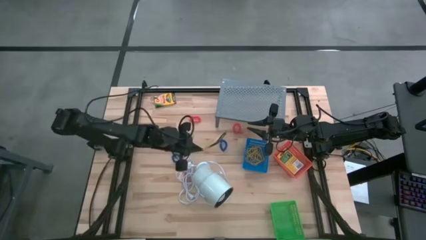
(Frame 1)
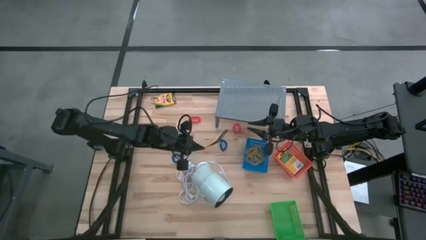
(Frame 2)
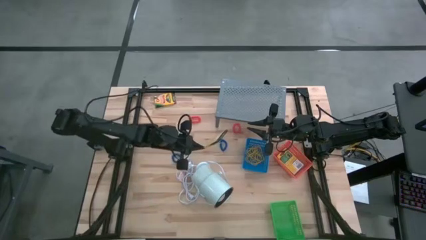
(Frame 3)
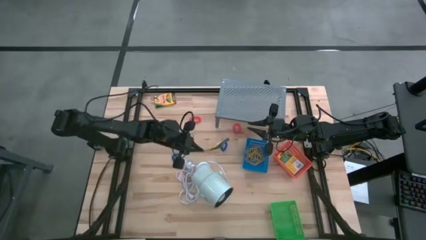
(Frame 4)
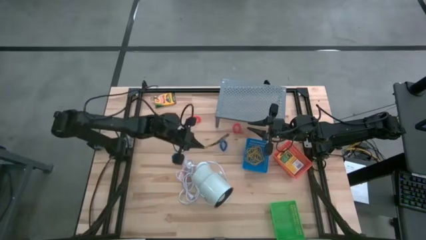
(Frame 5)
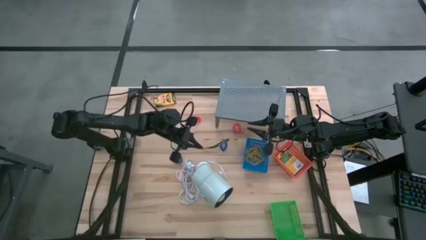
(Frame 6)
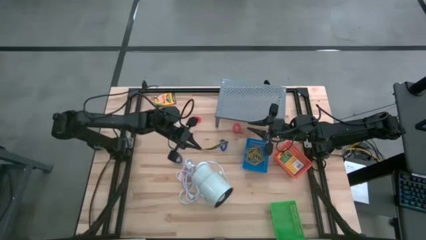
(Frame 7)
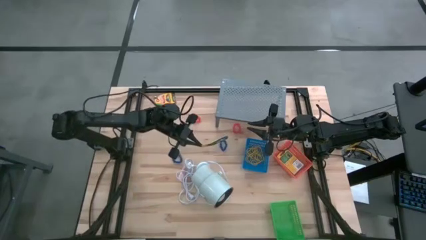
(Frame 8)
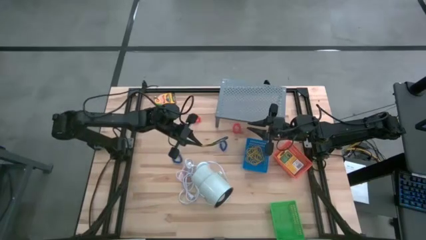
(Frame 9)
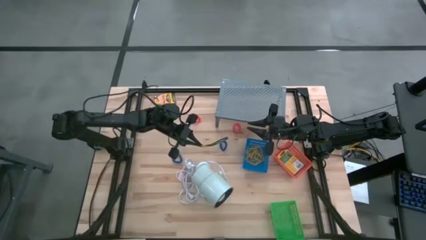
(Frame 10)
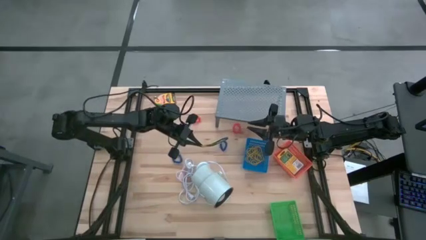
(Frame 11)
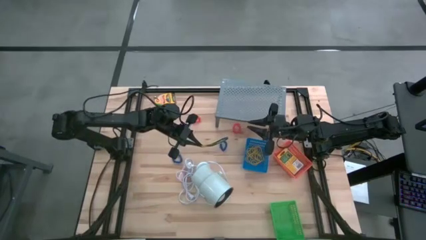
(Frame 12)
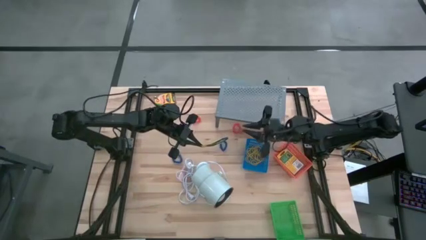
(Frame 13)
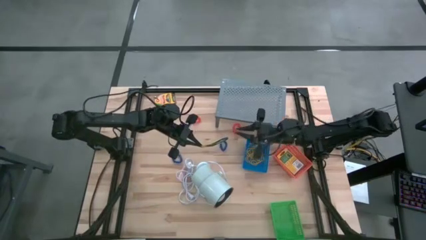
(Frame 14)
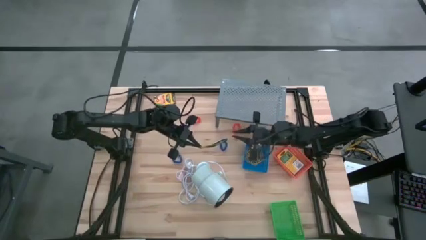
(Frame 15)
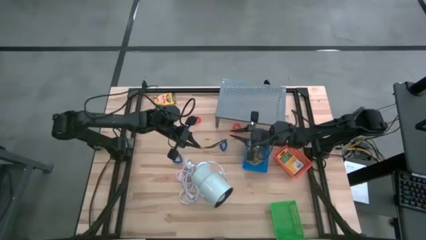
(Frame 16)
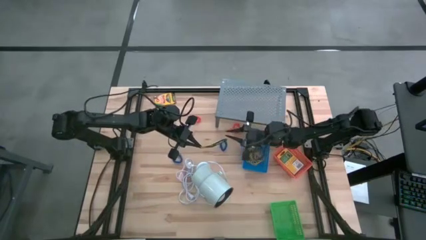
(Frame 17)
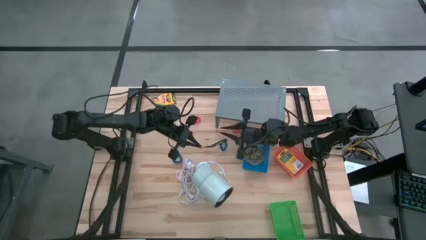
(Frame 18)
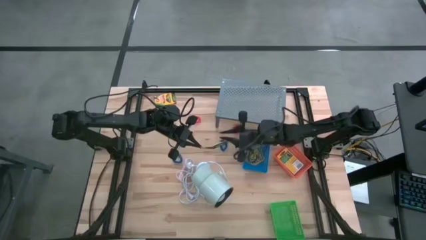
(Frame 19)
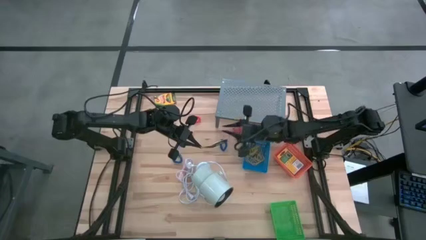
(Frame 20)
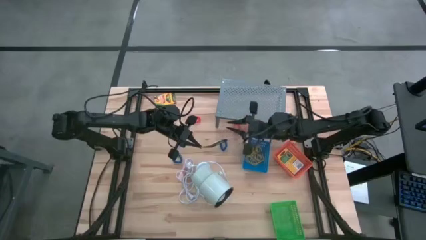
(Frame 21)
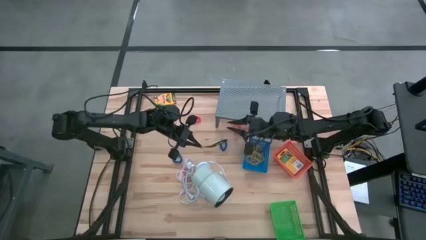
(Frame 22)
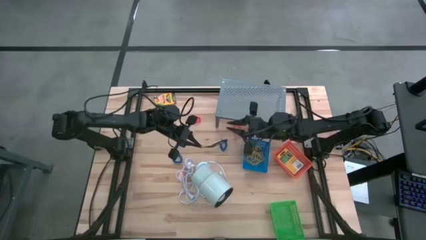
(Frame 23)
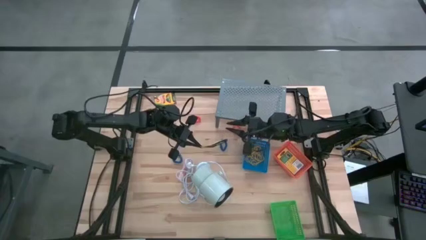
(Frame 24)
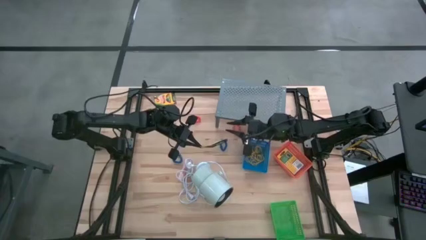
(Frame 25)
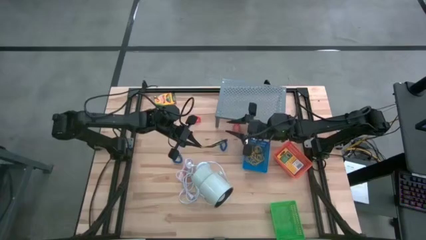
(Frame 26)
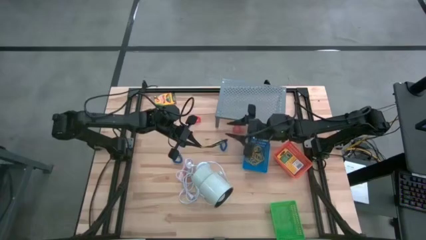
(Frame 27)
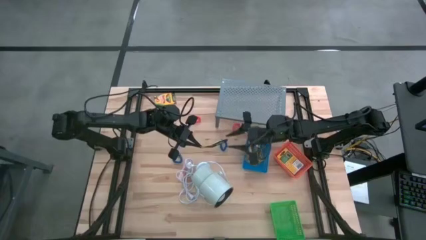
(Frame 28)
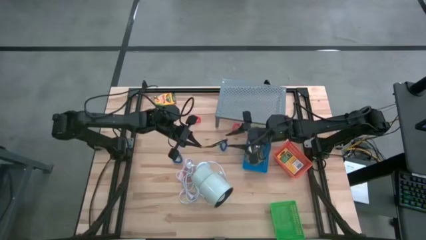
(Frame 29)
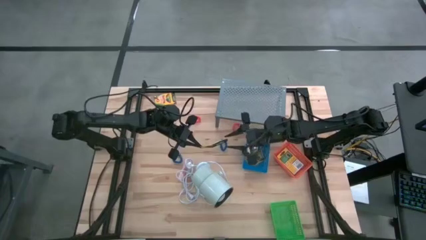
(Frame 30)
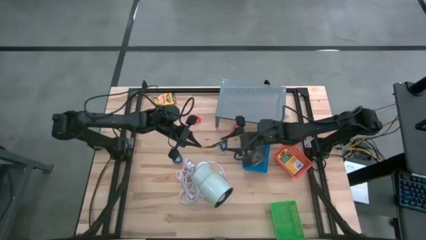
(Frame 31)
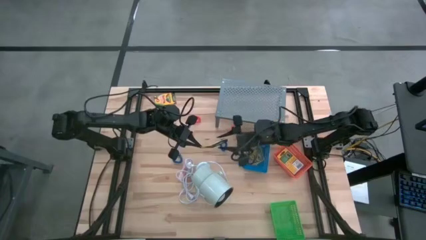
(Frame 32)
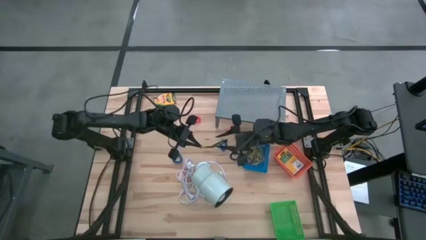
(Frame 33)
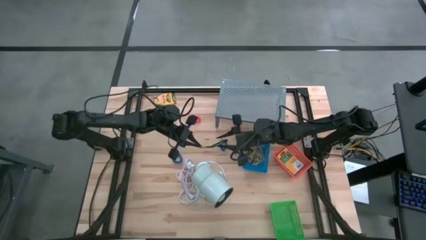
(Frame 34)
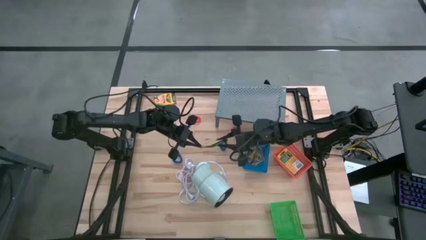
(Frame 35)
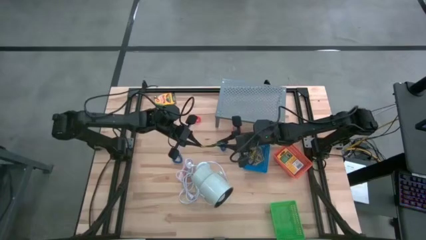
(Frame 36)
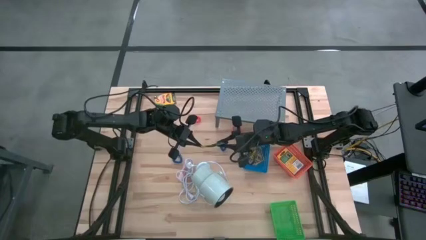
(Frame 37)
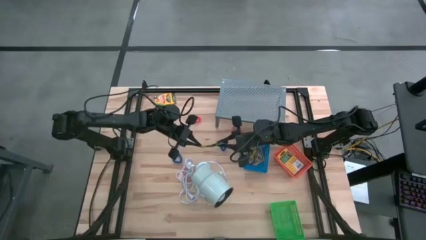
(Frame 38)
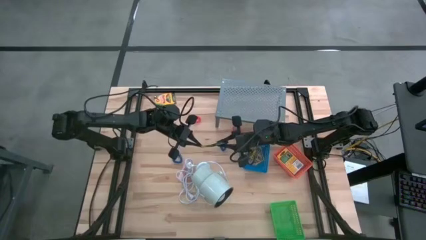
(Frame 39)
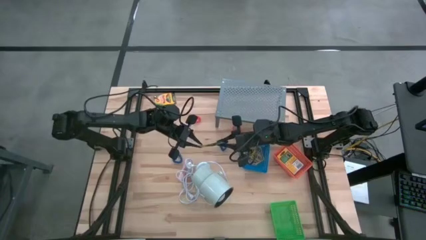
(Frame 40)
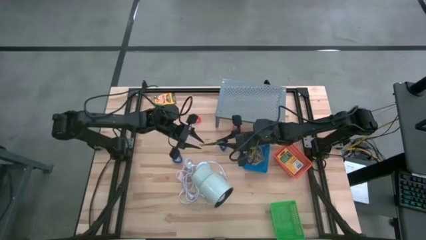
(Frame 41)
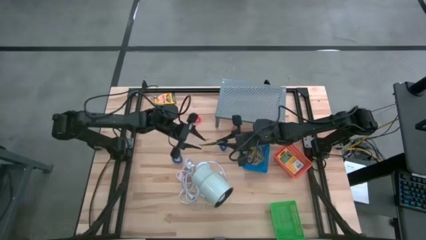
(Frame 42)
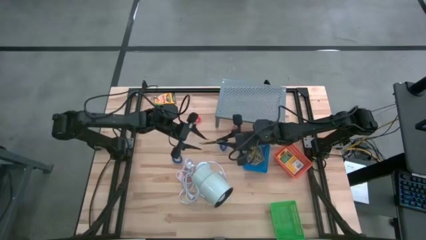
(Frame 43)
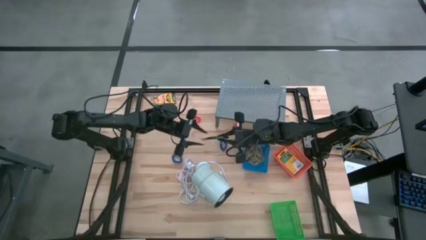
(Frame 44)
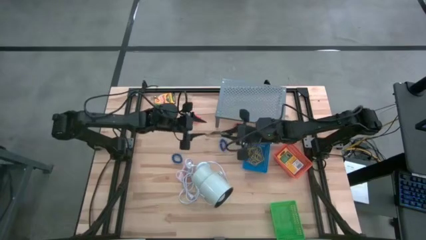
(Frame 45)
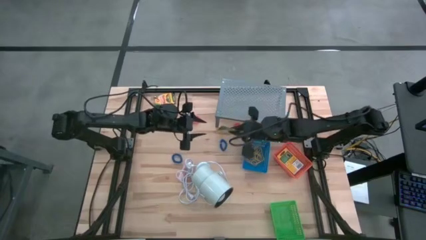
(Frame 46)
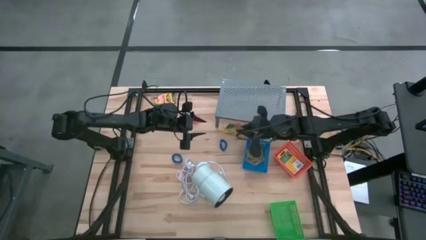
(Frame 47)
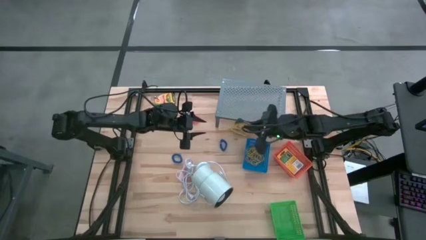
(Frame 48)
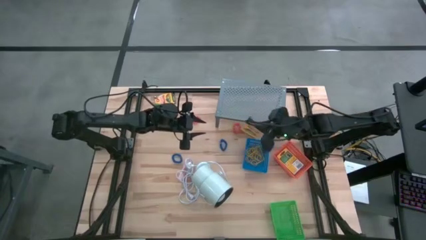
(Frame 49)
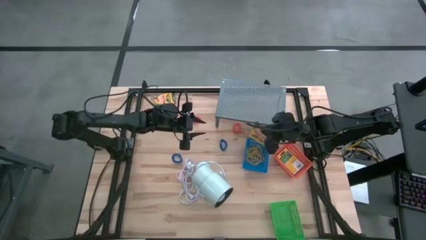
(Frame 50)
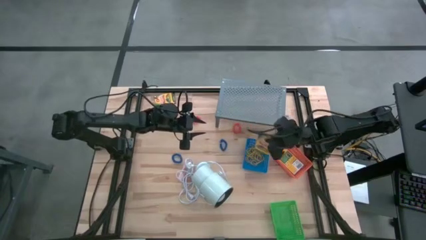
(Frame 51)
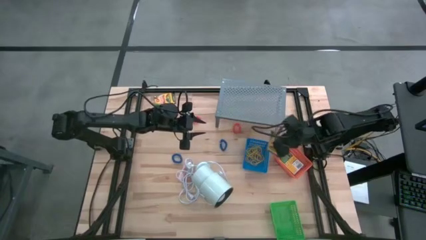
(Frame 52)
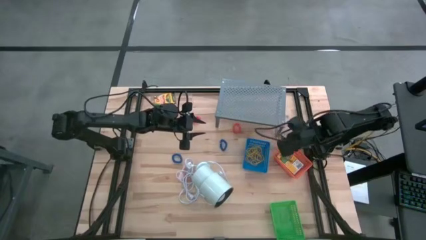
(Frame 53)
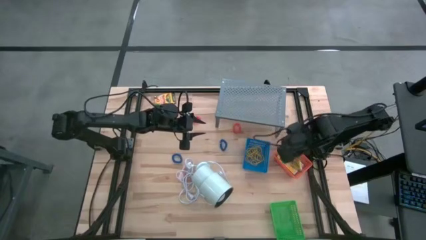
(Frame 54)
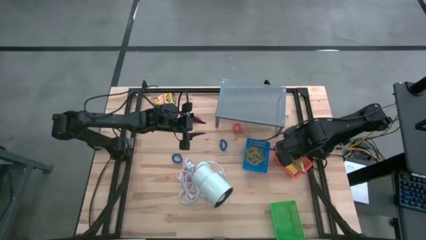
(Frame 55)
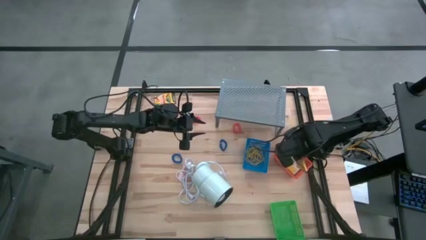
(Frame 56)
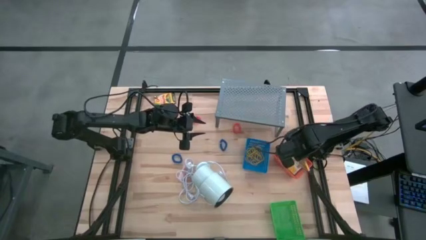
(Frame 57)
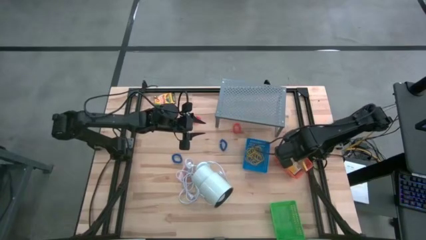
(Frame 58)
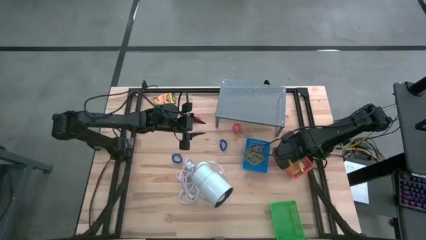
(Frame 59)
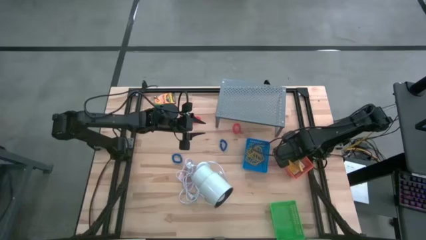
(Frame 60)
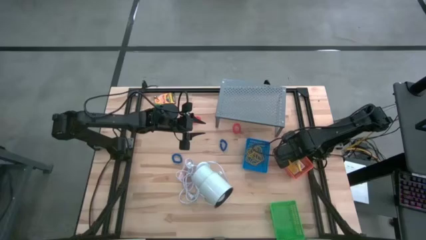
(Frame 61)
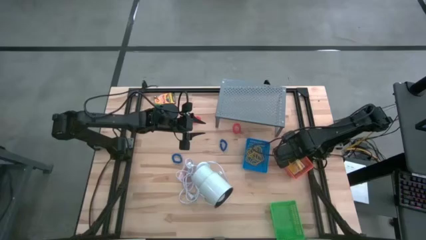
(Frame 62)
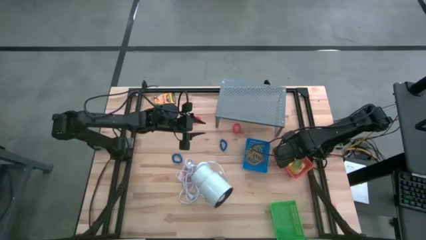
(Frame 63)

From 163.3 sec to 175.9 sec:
Task: Pick & Place Office Desk Supplies
Put the yellow box of crayons into the orange bin

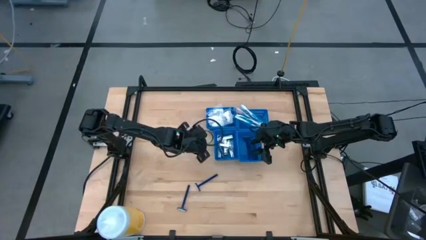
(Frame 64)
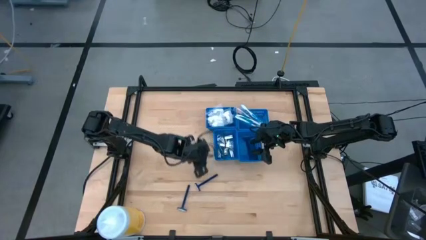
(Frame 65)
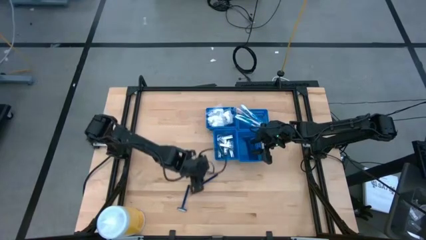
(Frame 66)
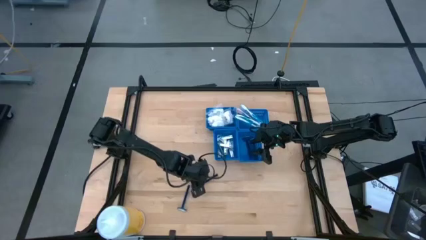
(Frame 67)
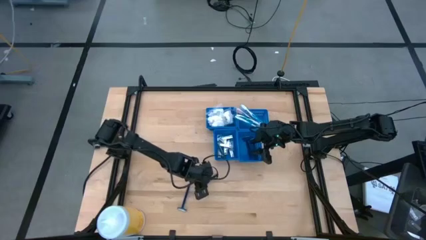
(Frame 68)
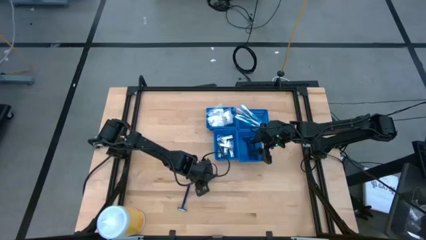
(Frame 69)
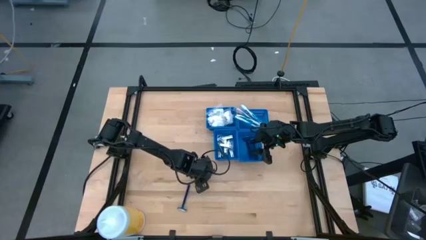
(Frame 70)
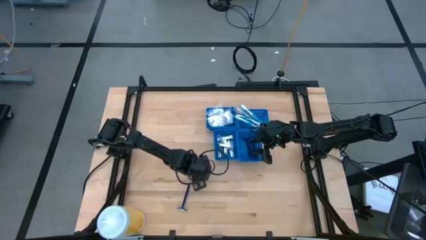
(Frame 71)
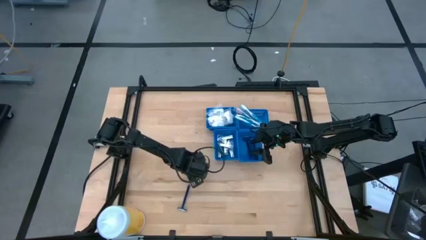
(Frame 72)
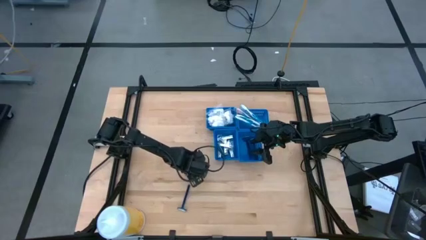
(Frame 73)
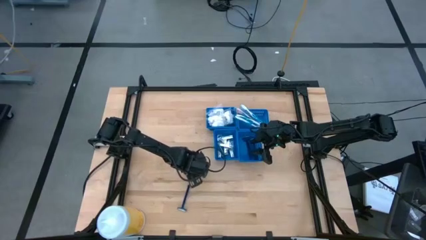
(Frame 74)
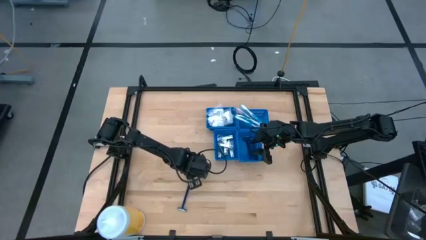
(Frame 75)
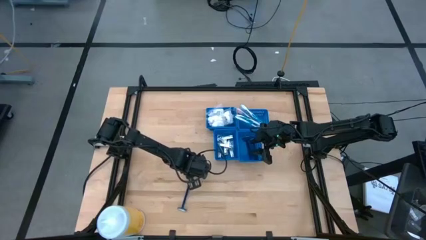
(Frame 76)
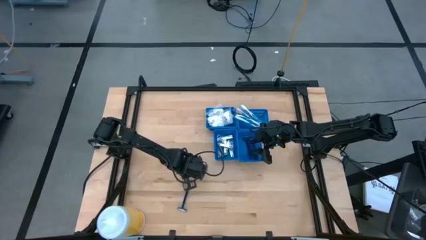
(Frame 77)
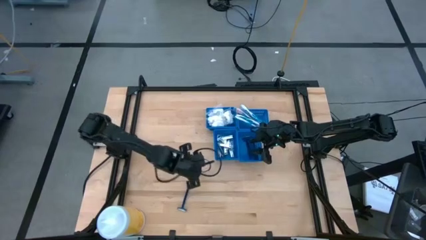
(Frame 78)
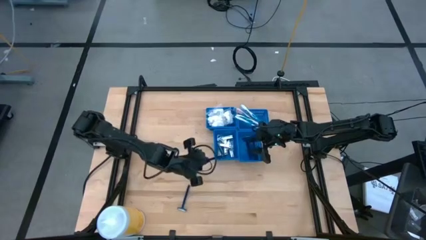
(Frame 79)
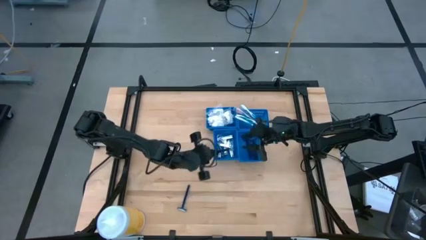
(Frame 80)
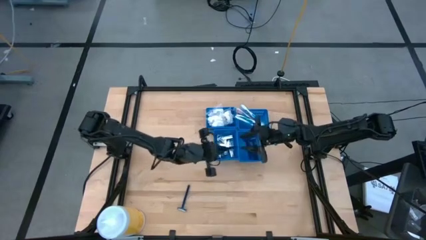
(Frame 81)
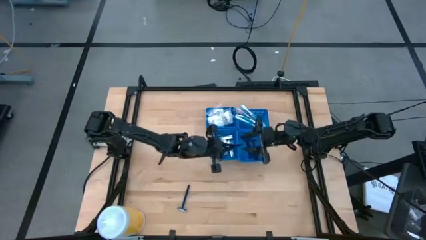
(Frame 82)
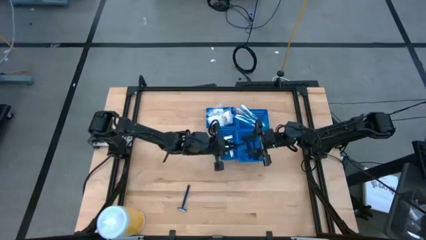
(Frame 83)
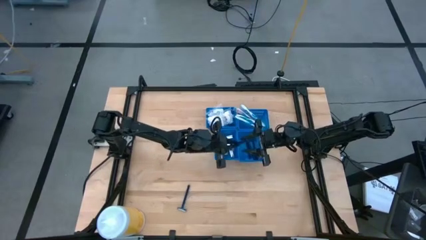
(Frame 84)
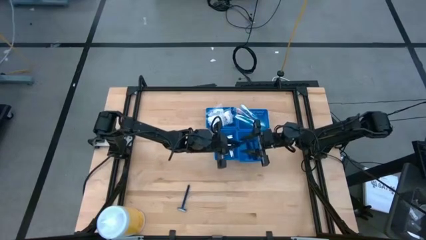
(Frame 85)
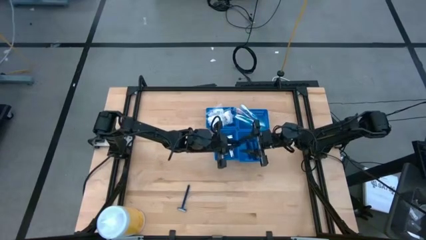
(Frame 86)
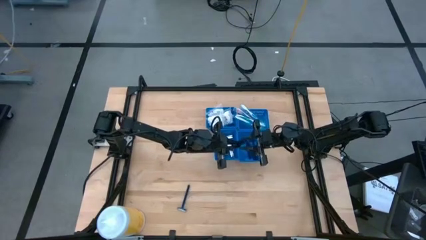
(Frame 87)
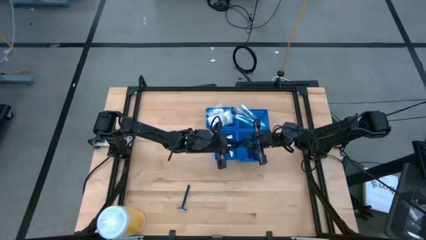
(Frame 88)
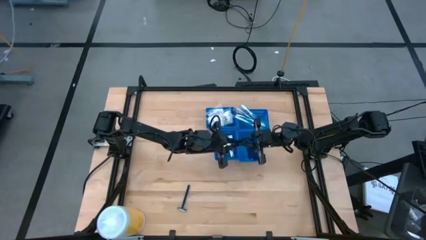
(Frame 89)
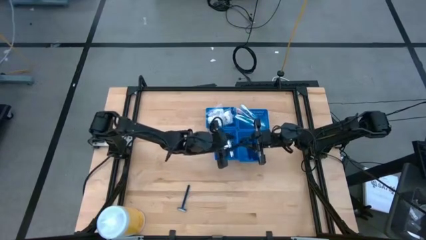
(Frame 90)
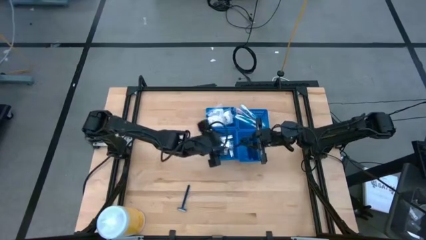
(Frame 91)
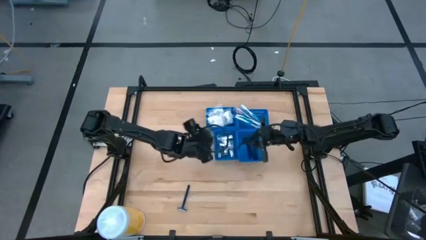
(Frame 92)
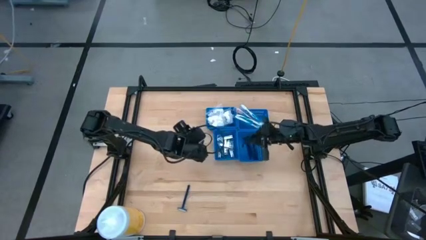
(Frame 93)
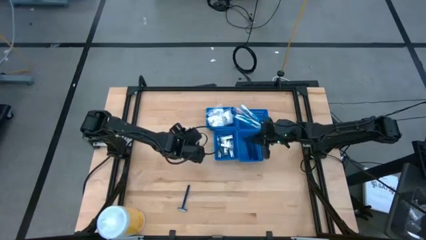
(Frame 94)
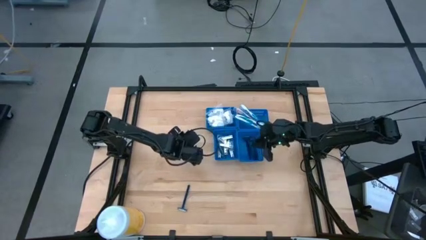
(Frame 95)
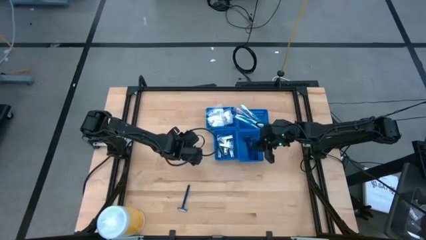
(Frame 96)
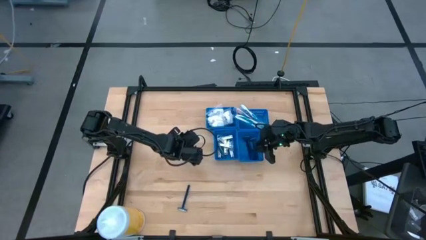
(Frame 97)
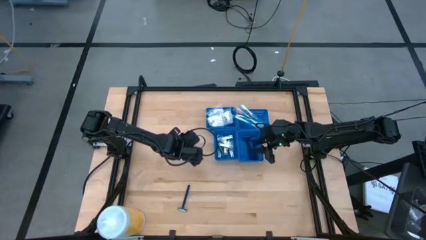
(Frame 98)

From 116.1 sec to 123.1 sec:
Task: Pick & Place Travel size toiletries
Put the blue razor into the bottom right blue basket
